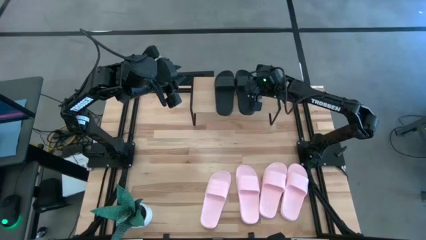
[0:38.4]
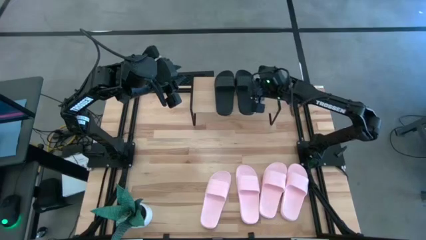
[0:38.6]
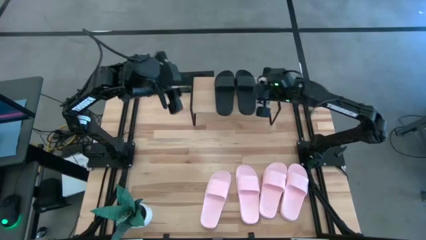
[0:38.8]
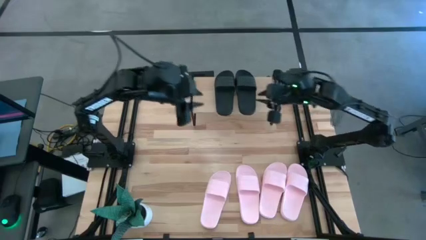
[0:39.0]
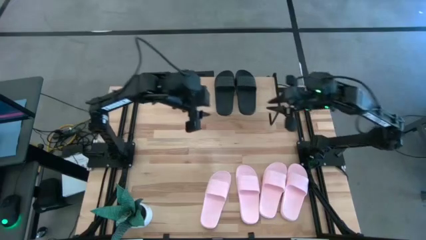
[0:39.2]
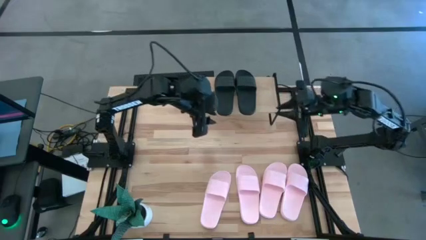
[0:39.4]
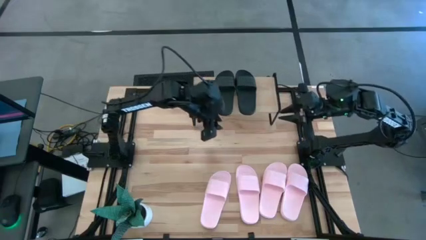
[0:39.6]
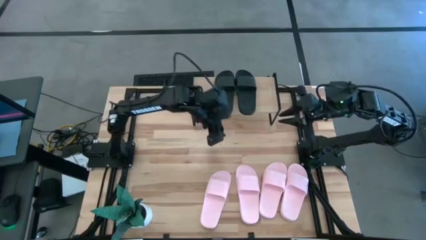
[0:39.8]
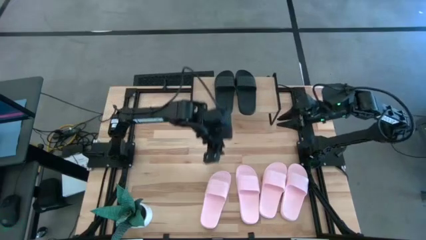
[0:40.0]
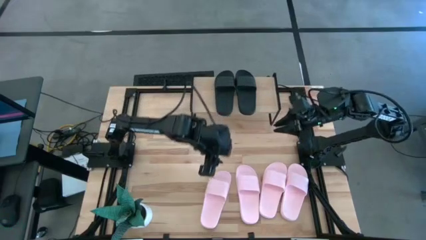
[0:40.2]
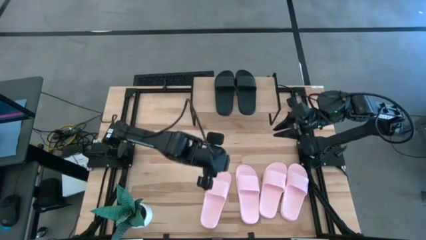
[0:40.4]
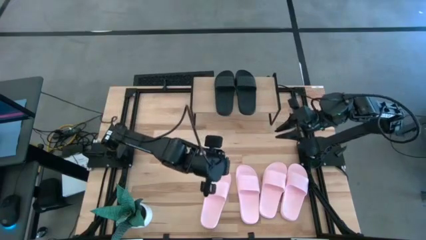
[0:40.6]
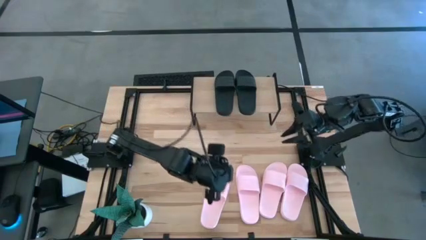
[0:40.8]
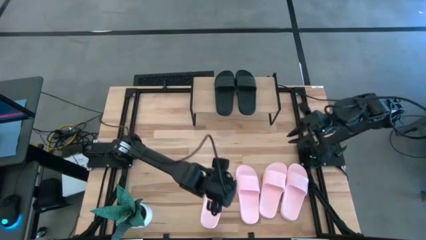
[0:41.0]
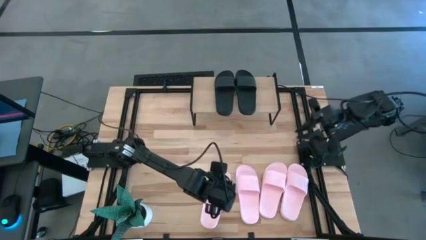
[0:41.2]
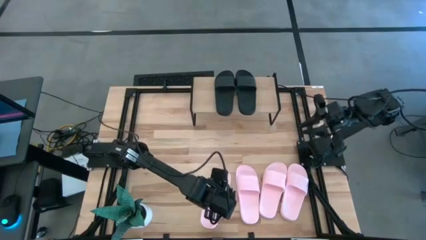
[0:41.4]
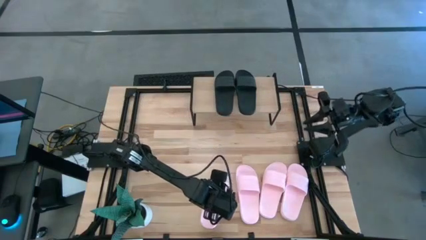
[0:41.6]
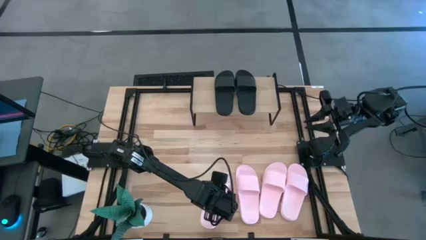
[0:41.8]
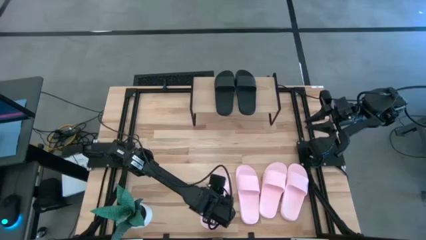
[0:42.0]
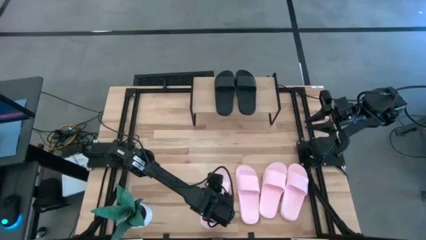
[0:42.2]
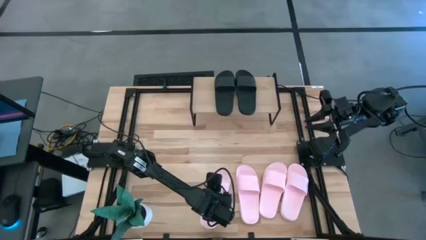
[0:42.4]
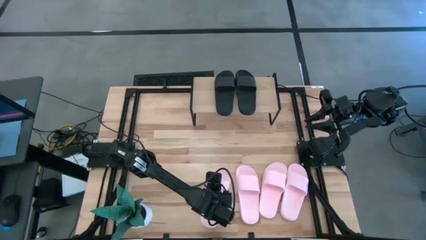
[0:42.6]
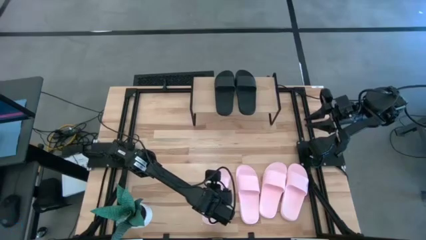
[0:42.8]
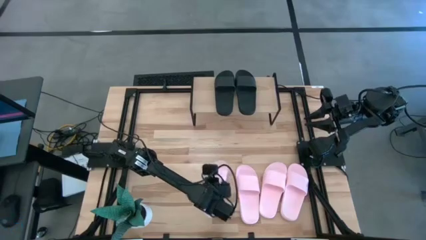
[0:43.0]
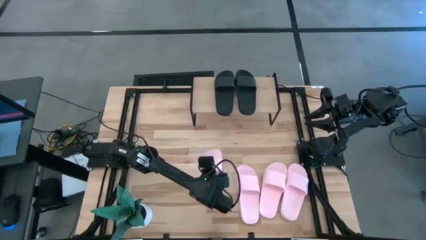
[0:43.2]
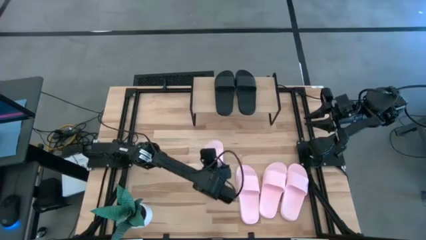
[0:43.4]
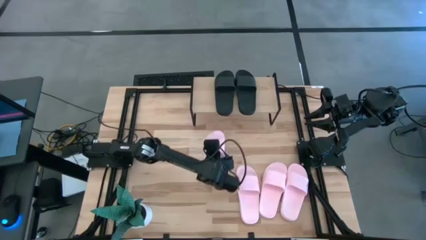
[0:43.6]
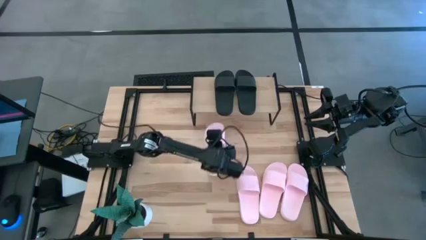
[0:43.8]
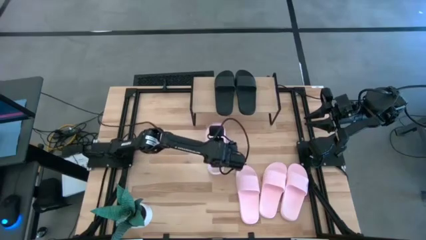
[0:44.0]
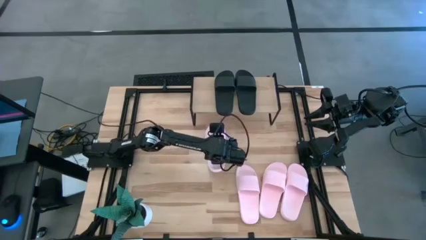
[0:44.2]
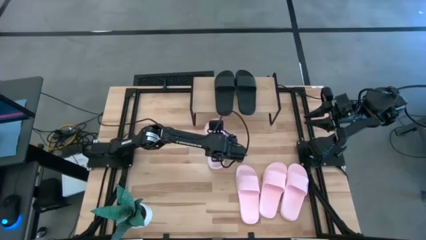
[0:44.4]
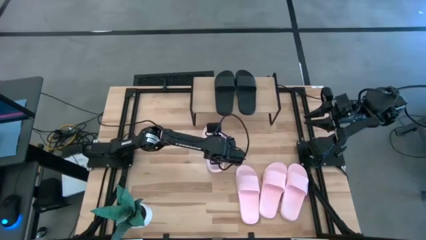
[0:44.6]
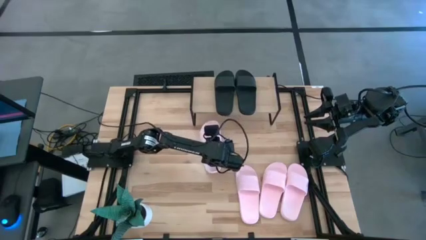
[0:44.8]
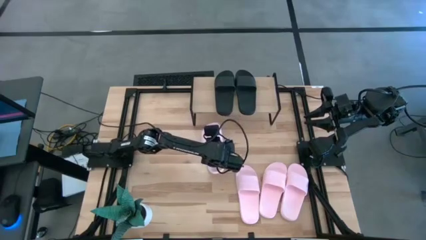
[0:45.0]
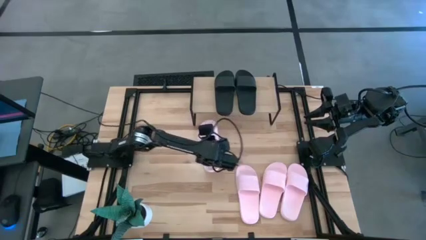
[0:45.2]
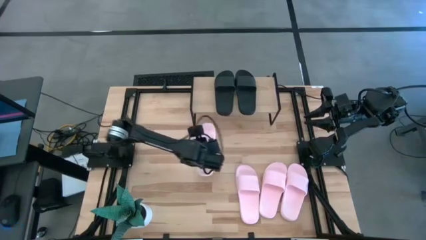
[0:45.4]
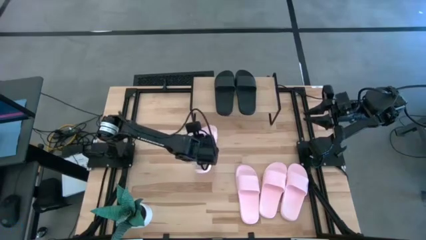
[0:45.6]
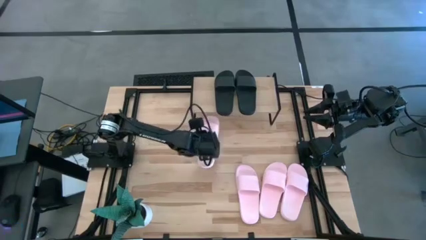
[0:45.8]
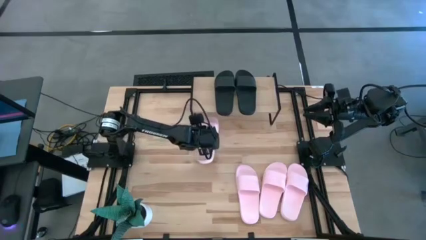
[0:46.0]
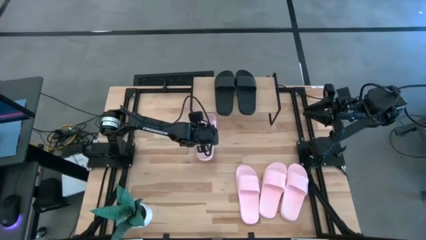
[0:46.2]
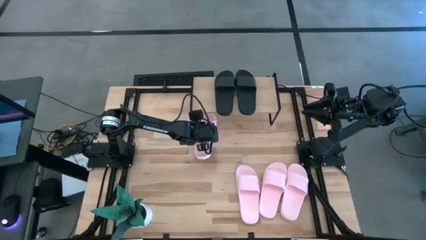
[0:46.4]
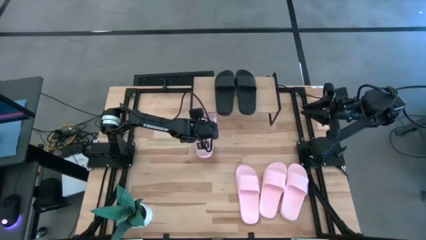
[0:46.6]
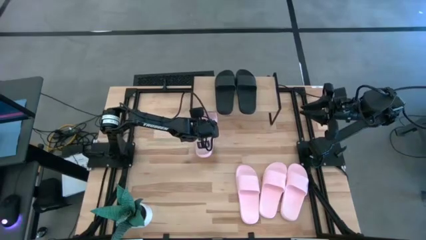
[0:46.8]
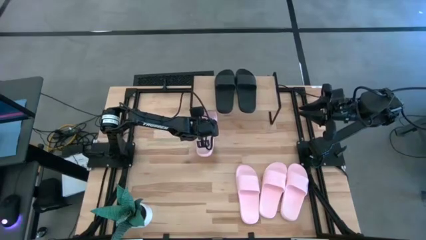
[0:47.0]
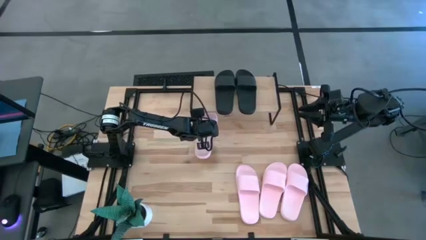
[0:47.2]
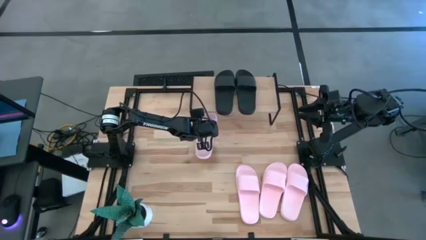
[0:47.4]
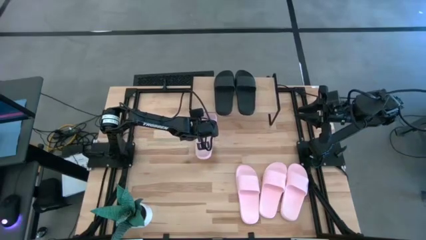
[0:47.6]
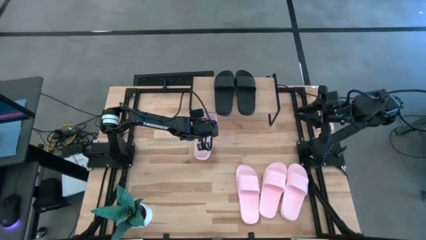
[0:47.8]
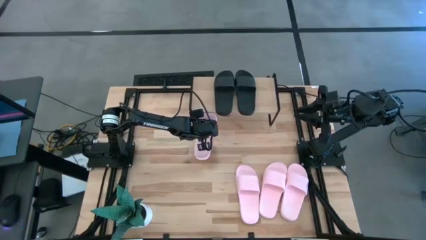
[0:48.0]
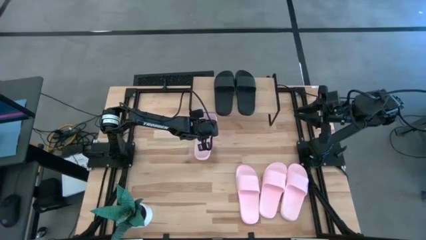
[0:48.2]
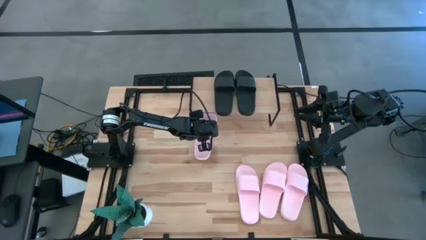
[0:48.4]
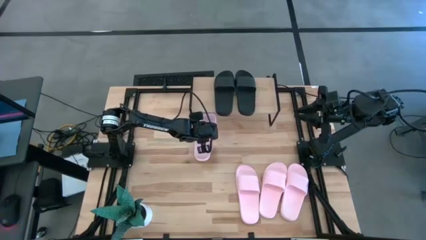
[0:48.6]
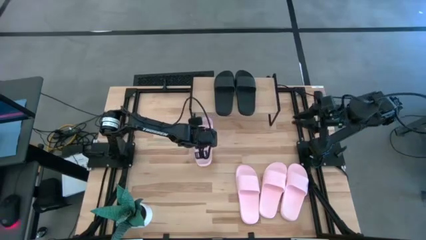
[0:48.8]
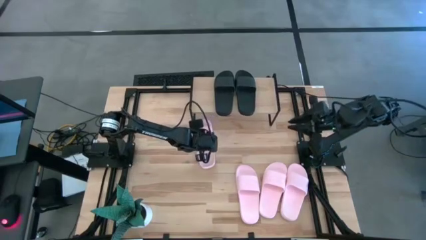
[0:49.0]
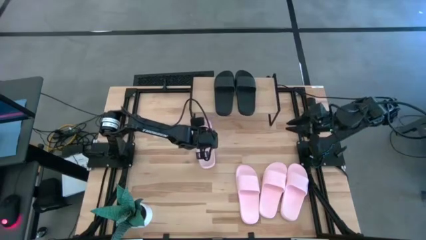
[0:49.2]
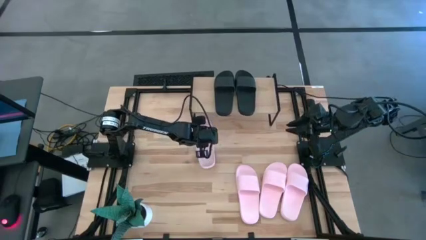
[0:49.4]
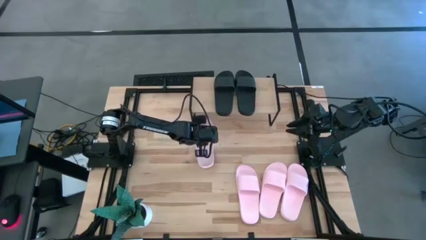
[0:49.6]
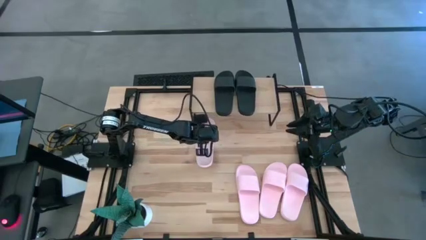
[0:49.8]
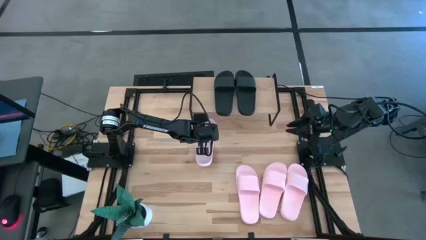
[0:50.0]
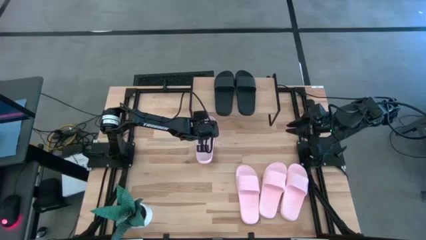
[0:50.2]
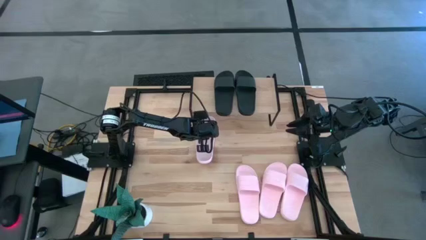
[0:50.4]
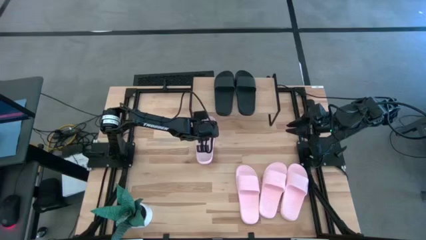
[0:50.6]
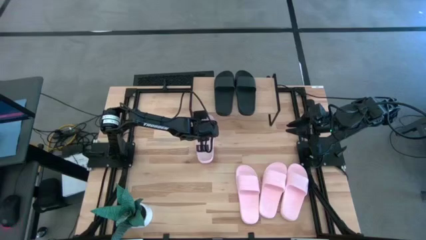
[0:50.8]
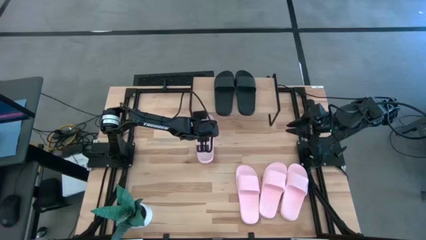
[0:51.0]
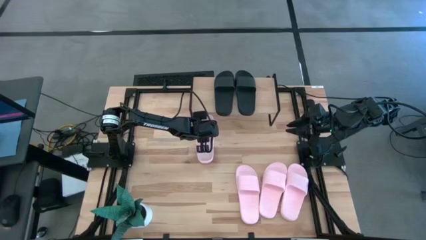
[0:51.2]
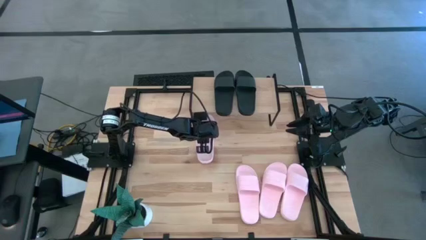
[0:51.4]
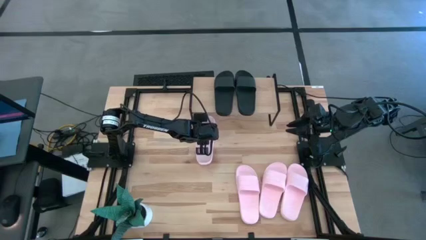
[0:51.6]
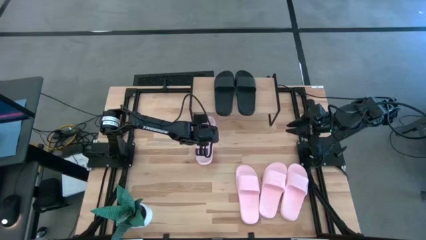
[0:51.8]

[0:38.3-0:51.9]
Task: Pick and place slides into the shelf
Put the pink slipper under the shelf

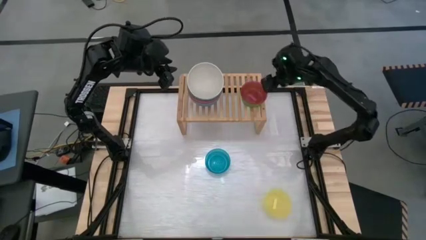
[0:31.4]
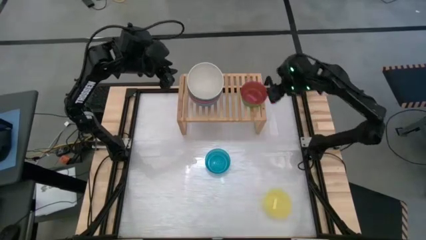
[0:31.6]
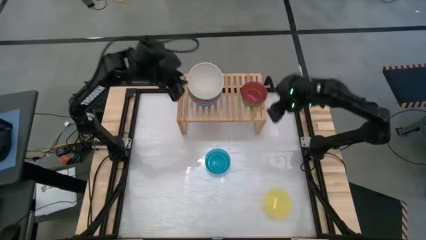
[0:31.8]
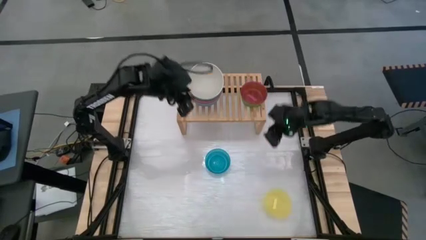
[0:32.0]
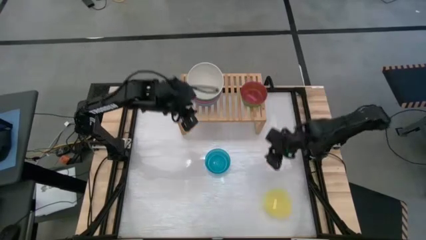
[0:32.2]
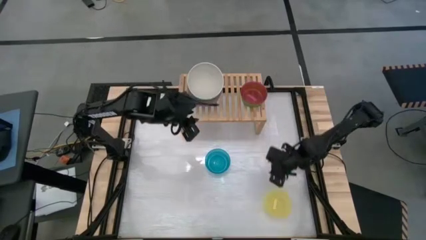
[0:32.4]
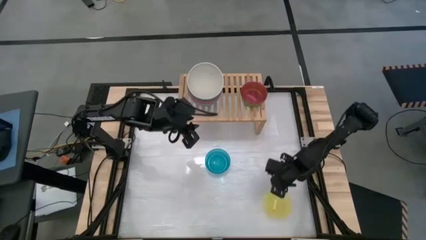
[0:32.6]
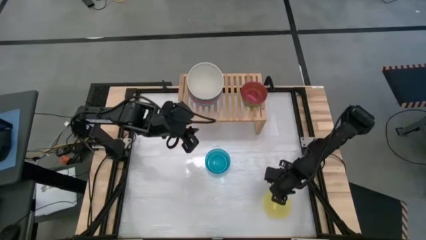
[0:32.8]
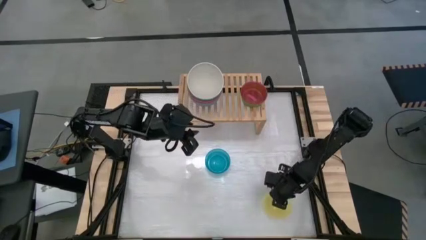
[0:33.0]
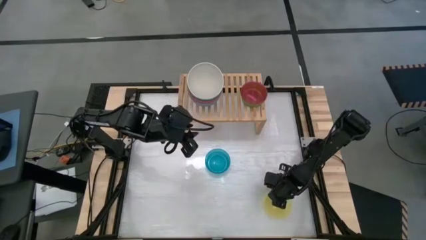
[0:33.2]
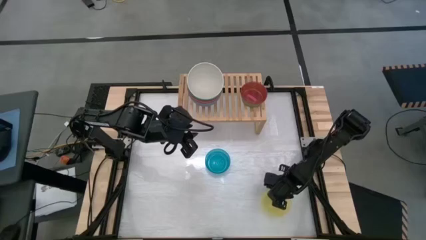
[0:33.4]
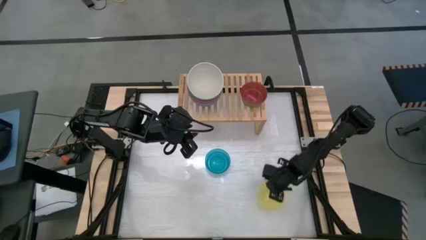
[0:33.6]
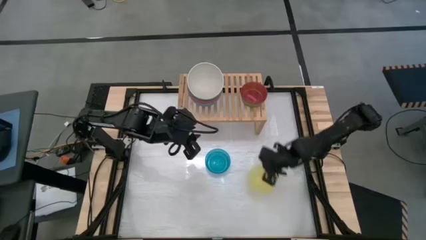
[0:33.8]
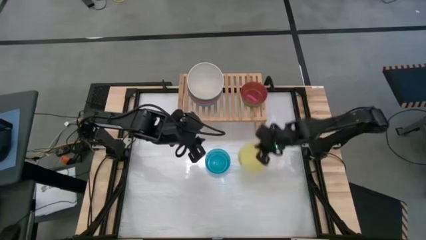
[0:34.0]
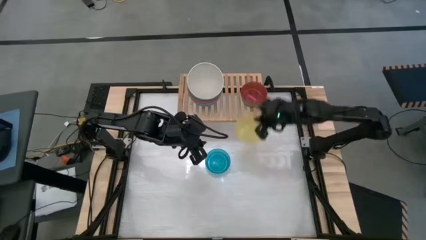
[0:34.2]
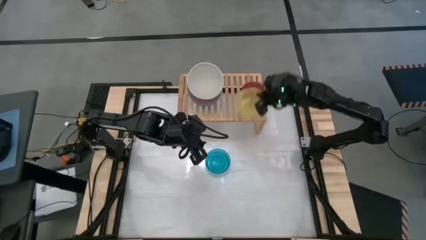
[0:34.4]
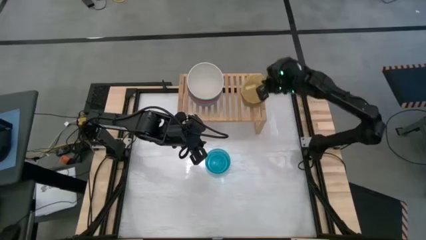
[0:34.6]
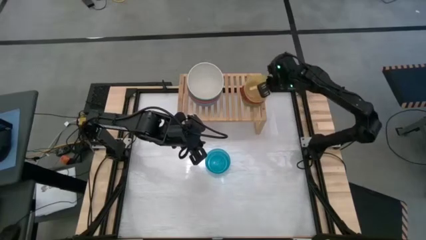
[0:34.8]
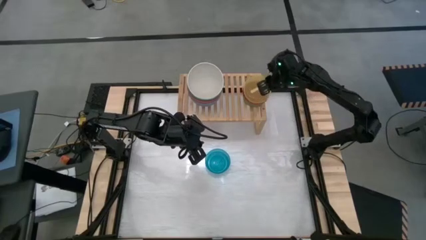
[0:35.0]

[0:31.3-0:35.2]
Task: Place and stack bowls onto a shelf
Stack the yellow bowl on top of the pink bowl on the shelf
